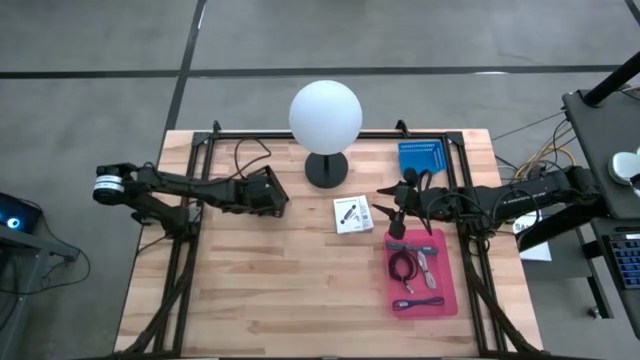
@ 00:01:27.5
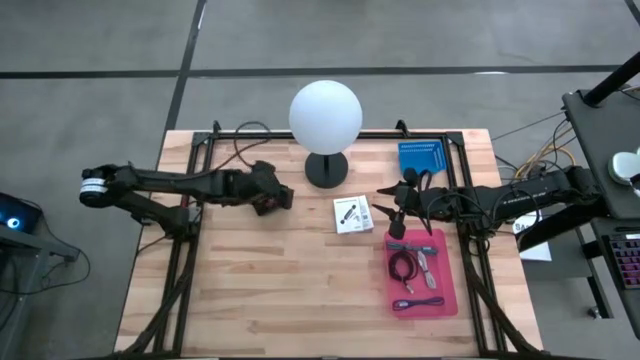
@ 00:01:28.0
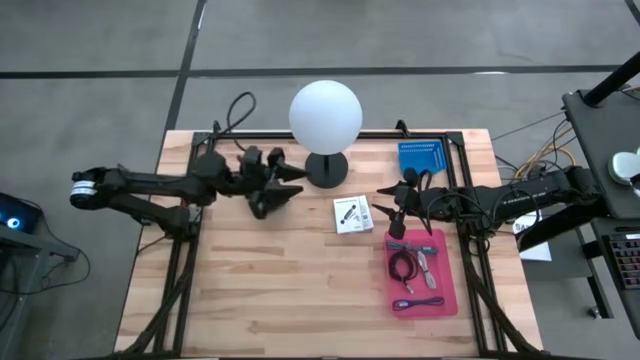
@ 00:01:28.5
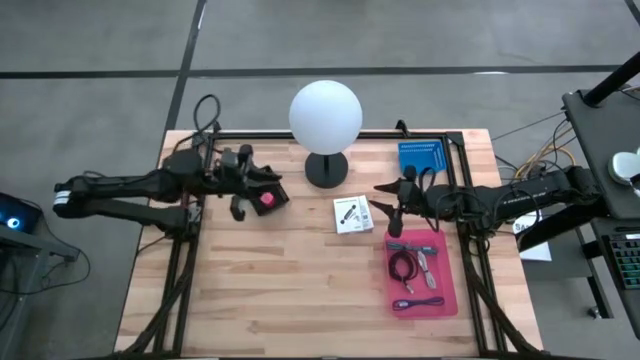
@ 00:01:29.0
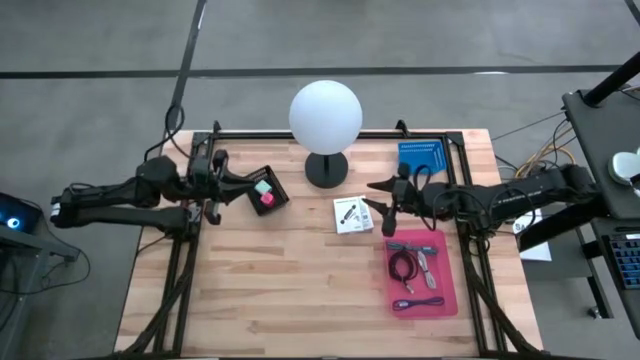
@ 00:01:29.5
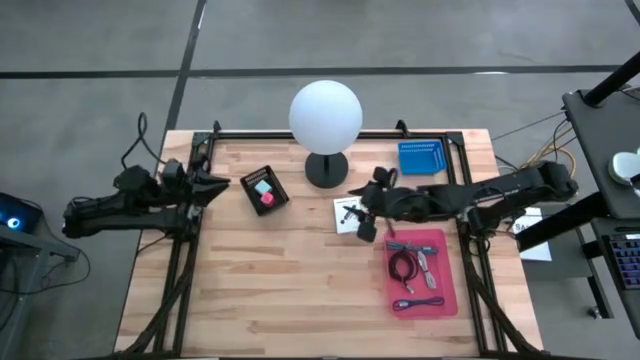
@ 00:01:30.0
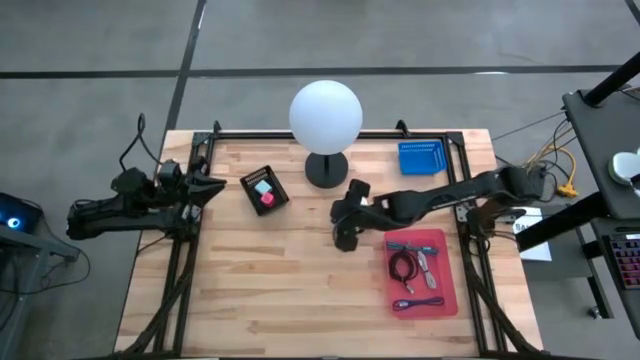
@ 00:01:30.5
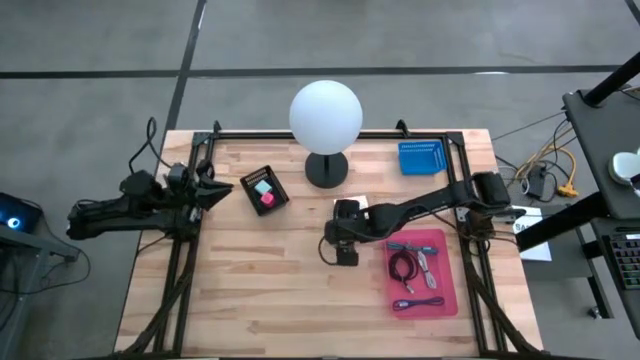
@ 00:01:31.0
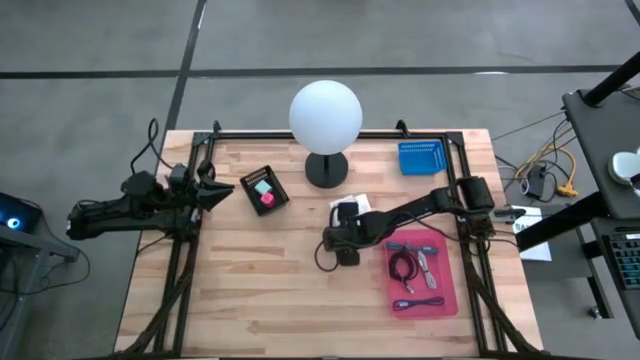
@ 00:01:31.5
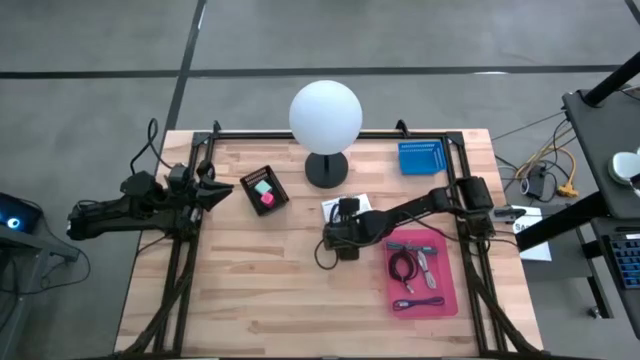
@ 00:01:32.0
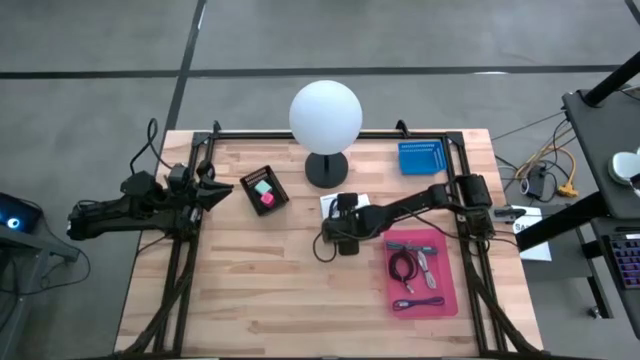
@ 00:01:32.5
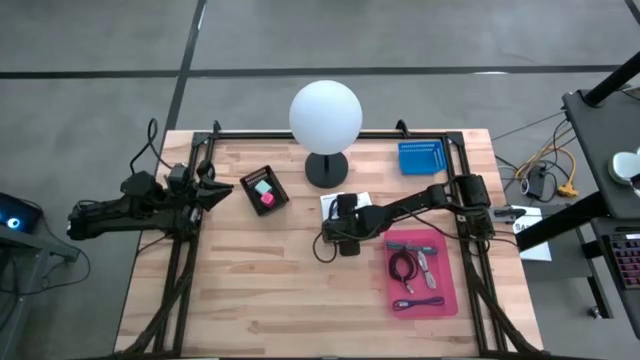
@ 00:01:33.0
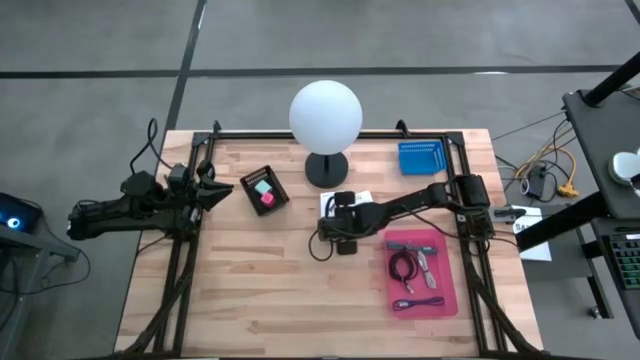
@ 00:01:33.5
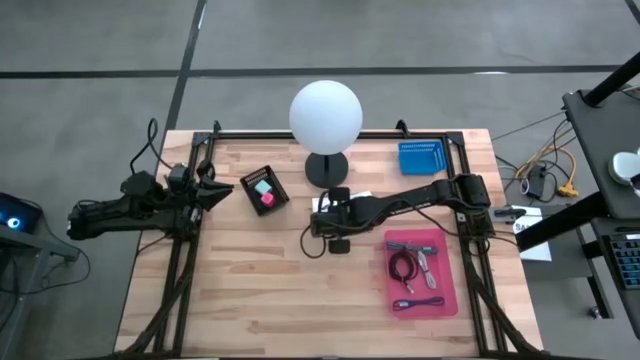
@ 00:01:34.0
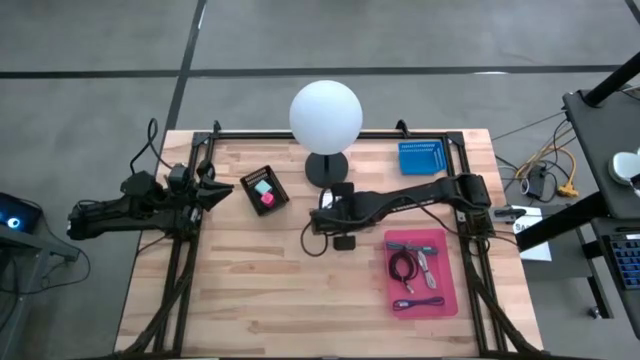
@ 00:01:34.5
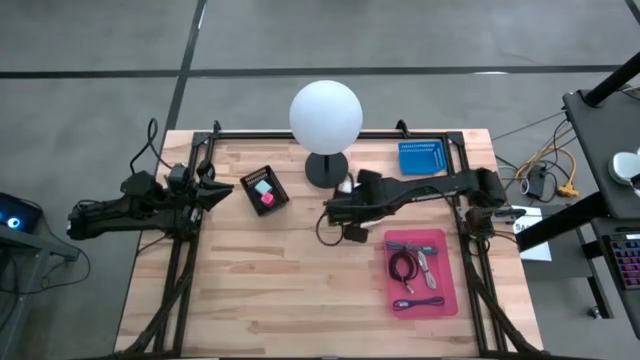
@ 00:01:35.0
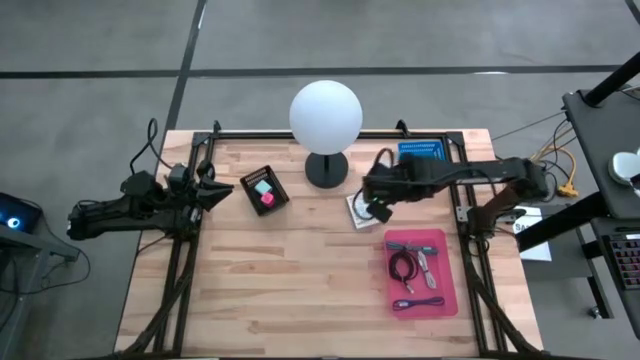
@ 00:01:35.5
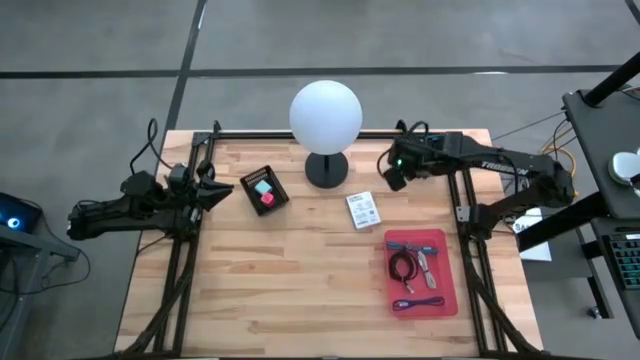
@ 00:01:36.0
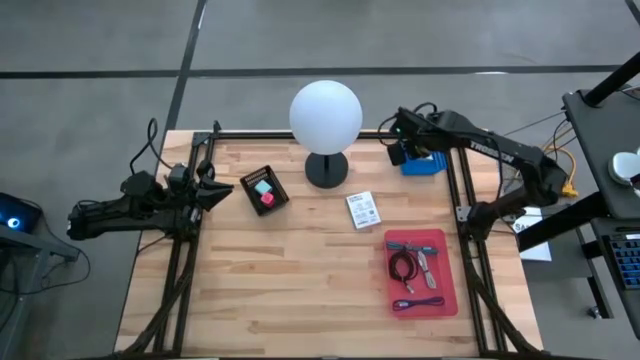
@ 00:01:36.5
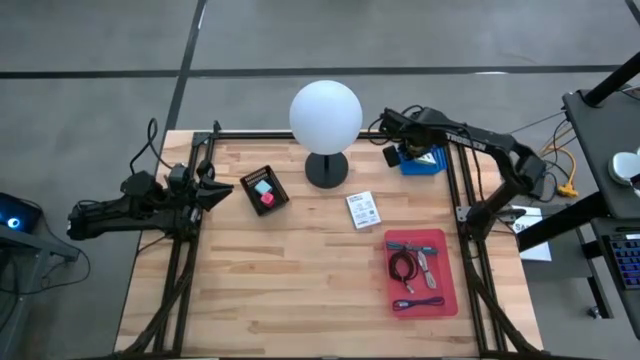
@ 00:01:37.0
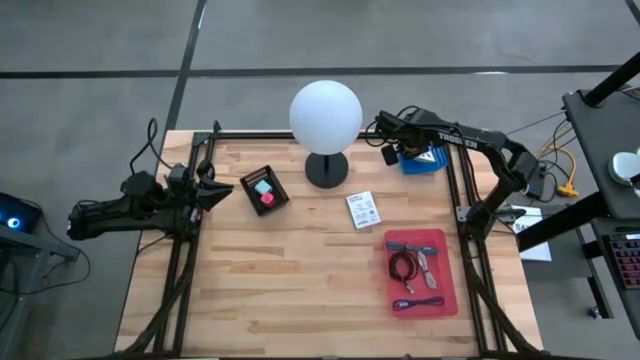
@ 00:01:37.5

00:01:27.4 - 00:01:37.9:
Task: Pick and place items into bin
Put the white card reader box into the blue bin

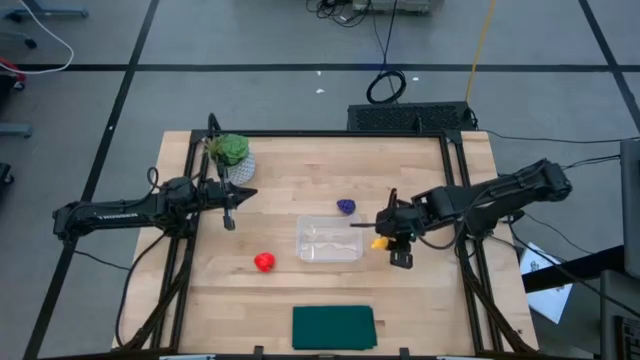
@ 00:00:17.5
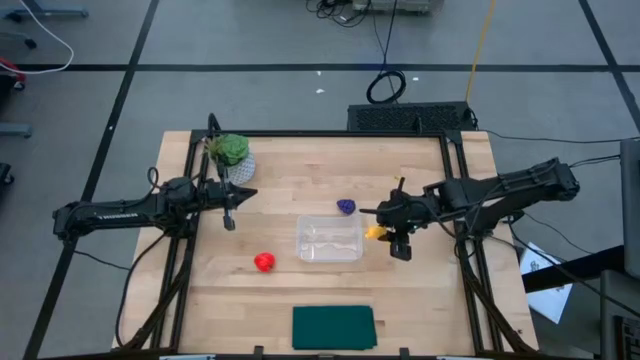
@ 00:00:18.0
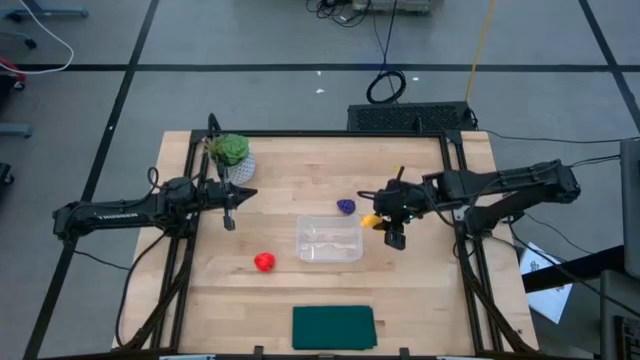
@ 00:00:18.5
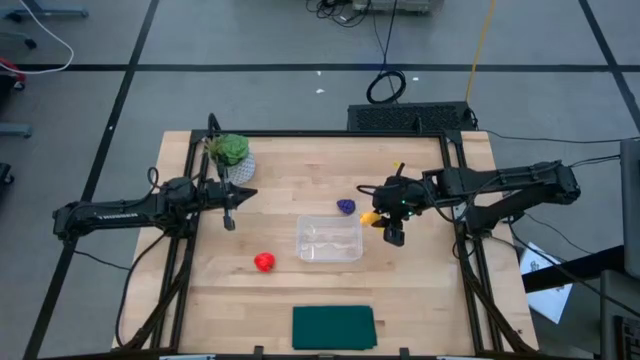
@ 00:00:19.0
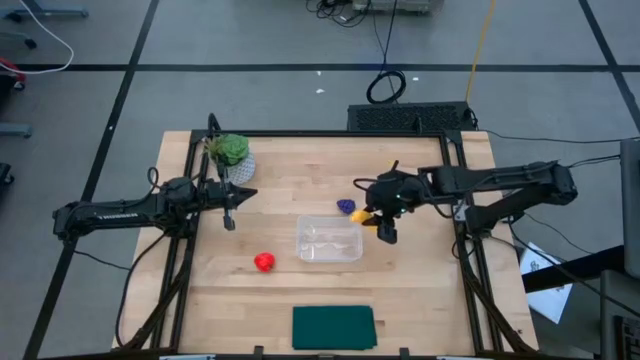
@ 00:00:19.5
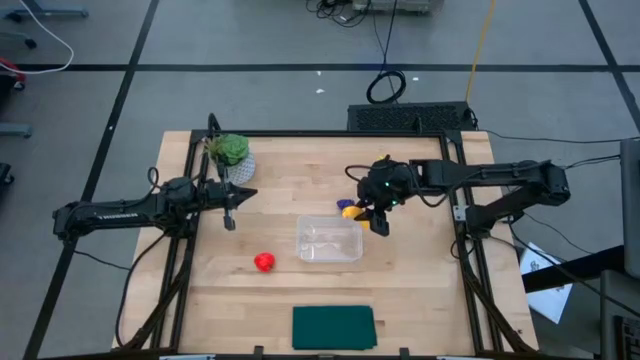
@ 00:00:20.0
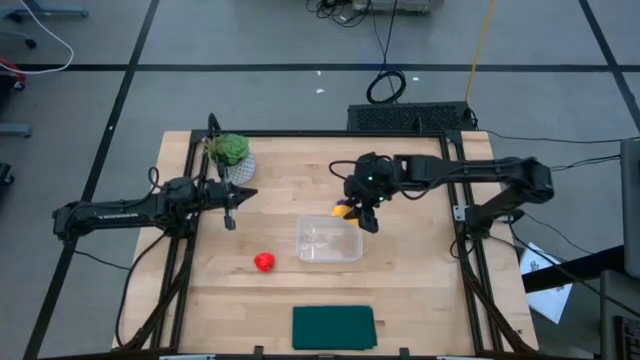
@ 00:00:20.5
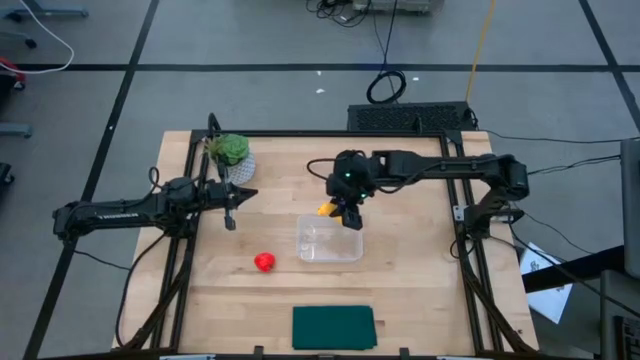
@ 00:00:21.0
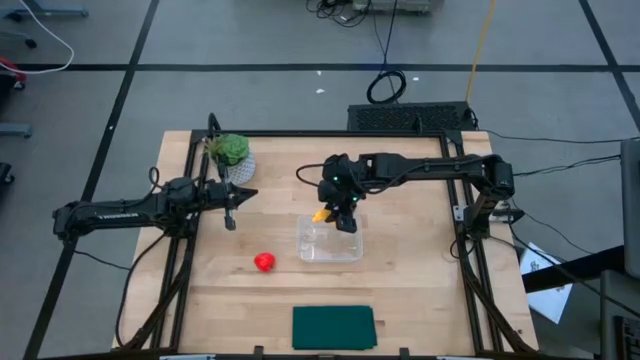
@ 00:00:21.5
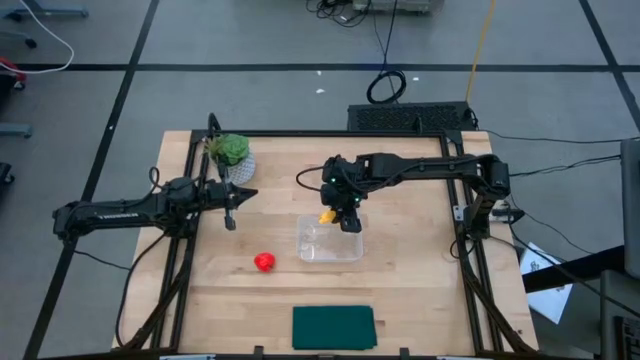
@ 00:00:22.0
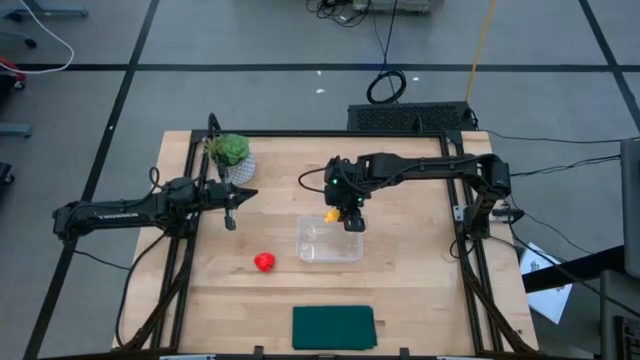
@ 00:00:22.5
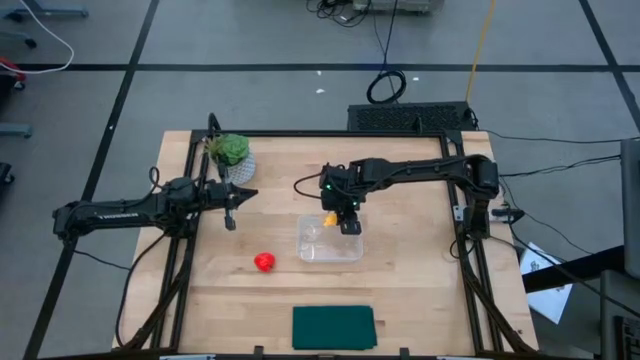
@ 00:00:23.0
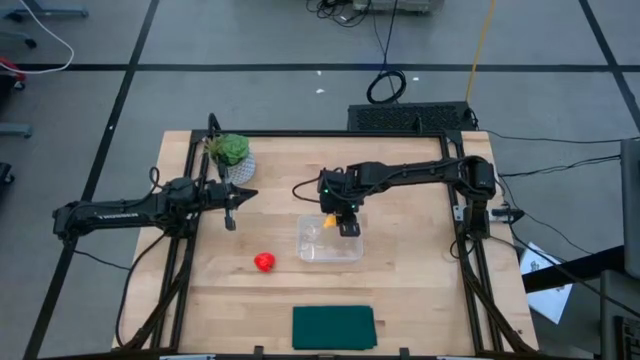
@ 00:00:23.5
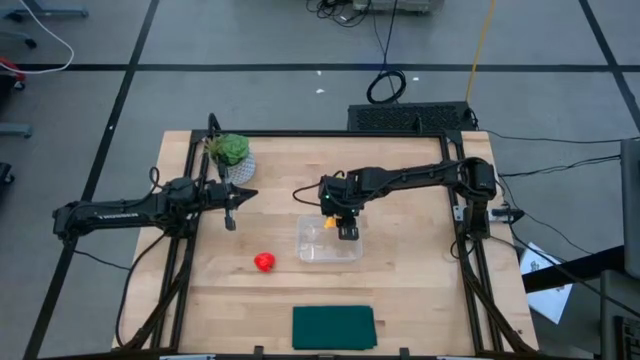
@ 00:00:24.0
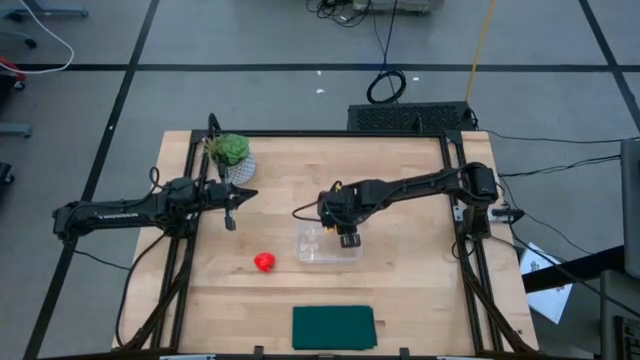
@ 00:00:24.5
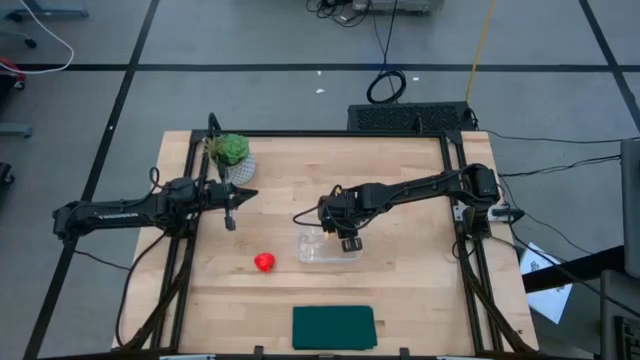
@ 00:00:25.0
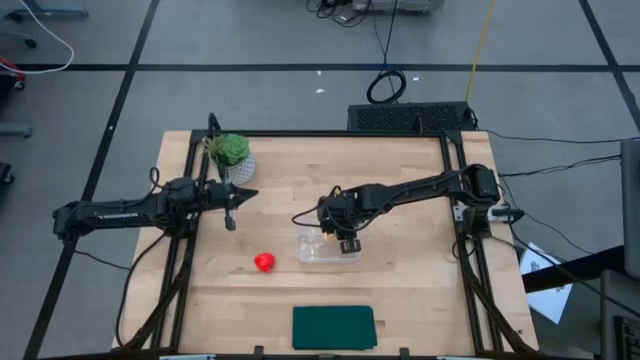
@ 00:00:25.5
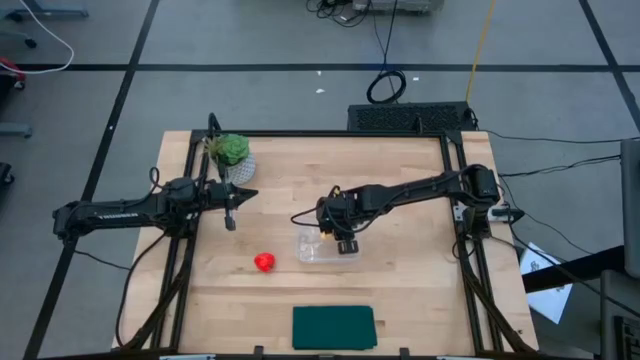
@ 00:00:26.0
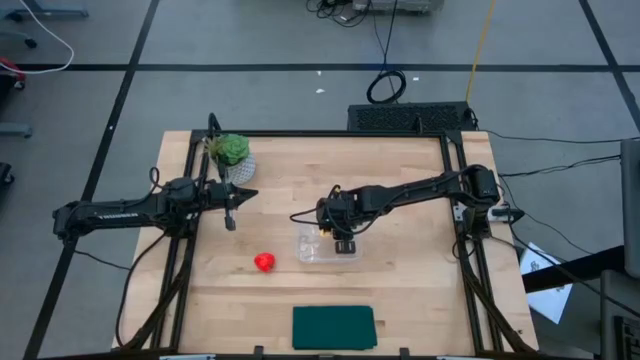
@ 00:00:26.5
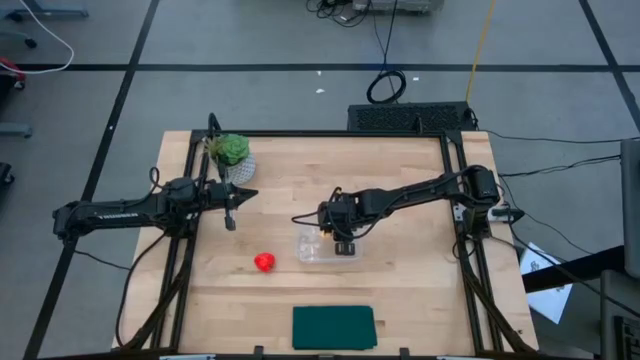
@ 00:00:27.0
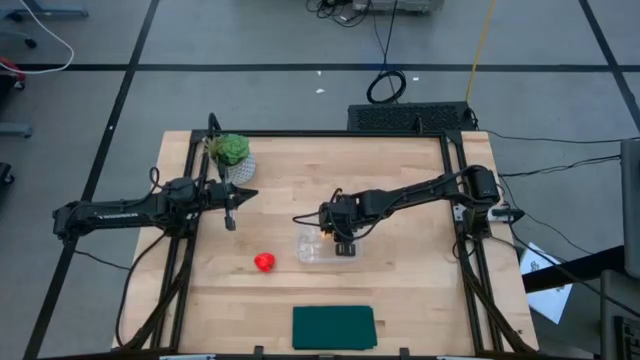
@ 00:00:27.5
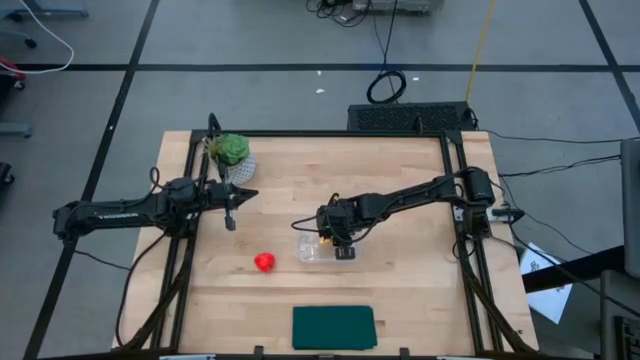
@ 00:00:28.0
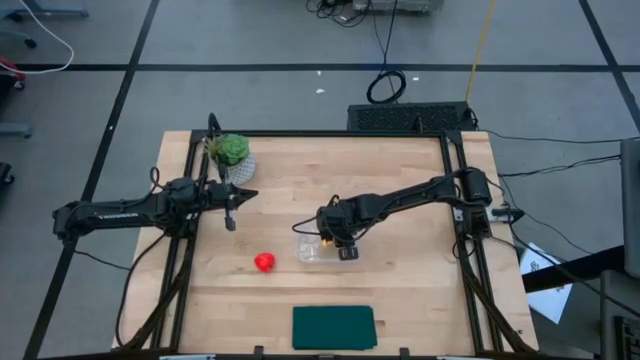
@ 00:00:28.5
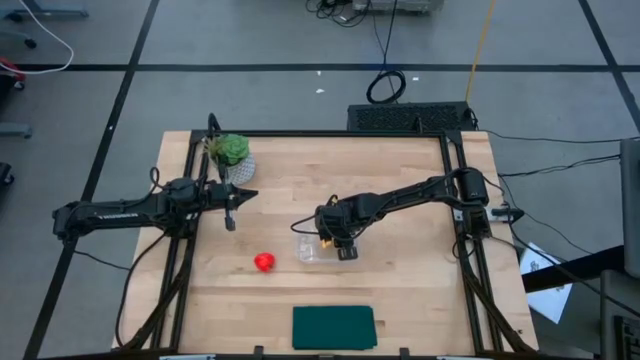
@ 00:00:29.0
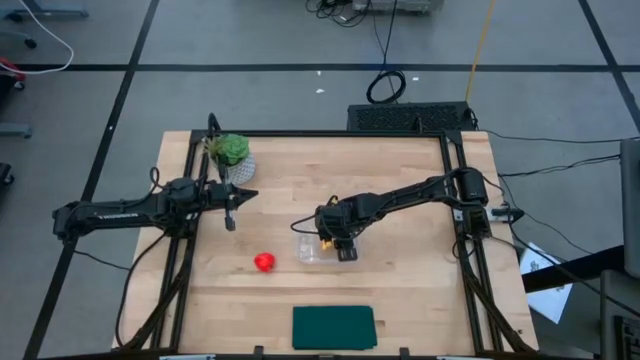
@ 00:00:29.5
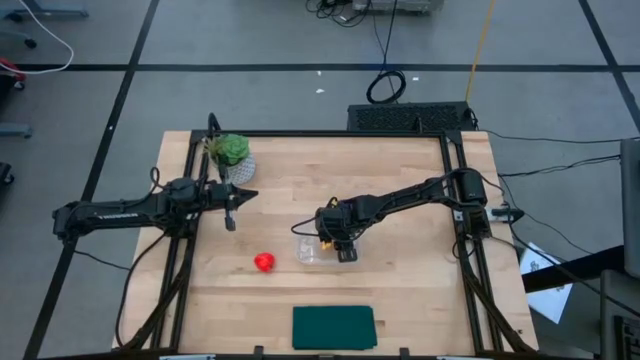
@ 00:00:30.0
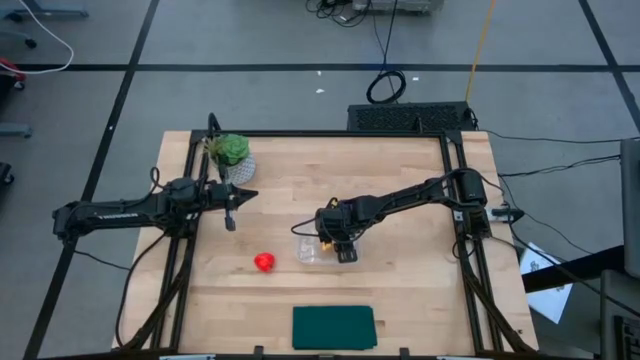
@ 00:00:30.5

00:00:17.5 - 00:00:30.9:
Task: Pick and placing Produce into tupperware
Put the banana into the transparent bin
